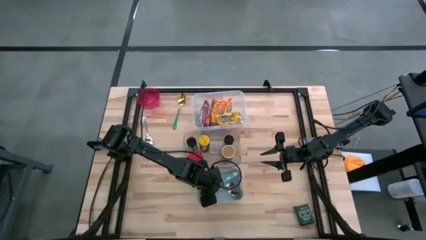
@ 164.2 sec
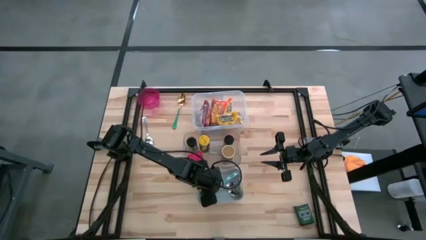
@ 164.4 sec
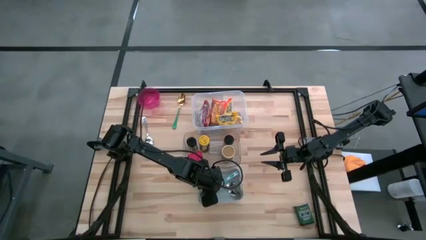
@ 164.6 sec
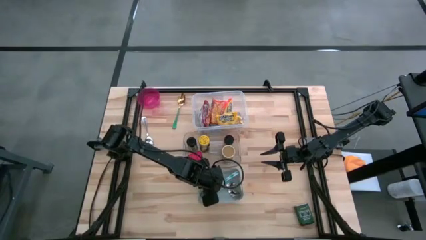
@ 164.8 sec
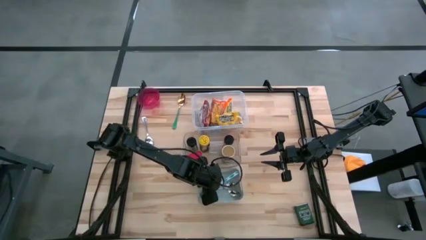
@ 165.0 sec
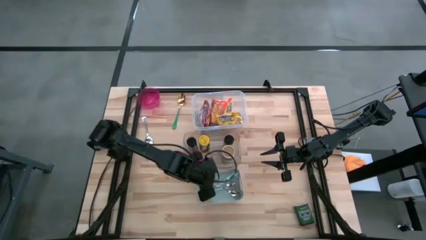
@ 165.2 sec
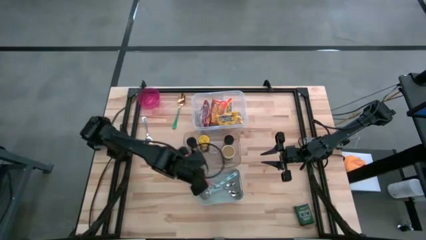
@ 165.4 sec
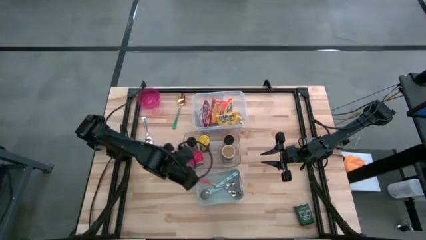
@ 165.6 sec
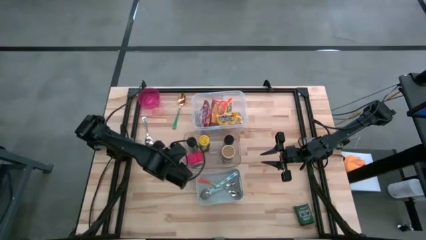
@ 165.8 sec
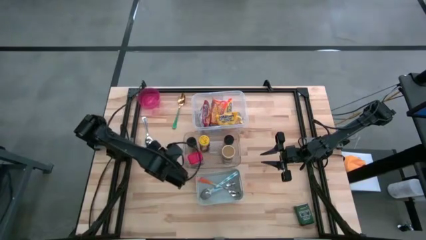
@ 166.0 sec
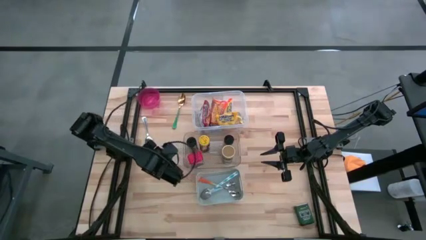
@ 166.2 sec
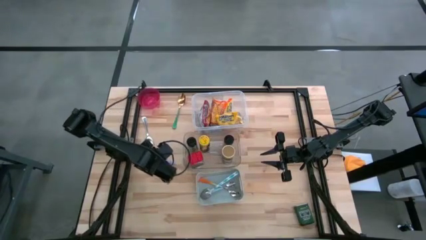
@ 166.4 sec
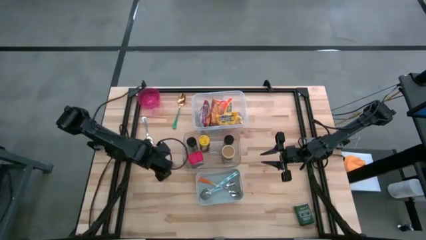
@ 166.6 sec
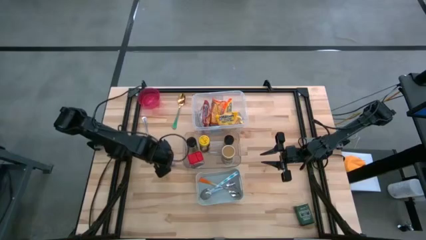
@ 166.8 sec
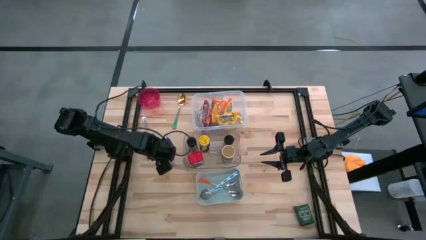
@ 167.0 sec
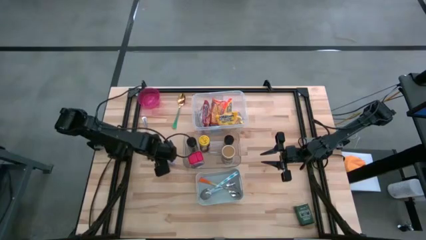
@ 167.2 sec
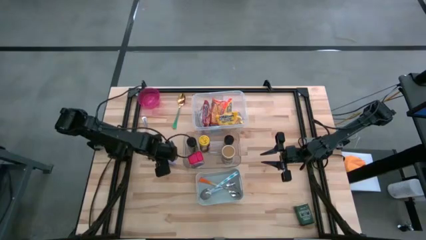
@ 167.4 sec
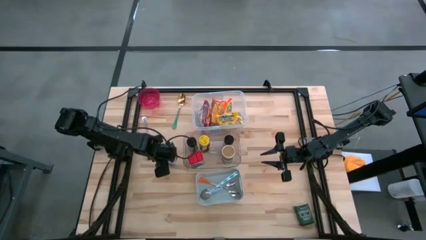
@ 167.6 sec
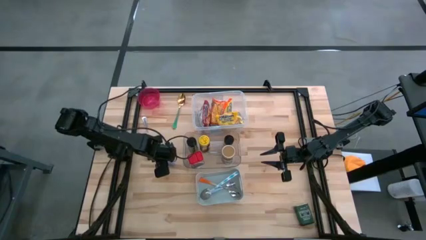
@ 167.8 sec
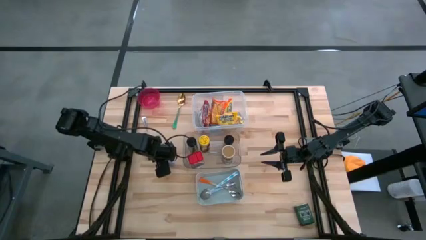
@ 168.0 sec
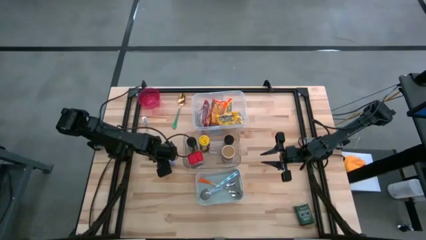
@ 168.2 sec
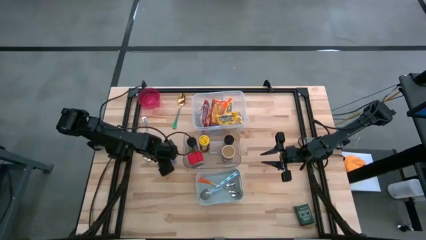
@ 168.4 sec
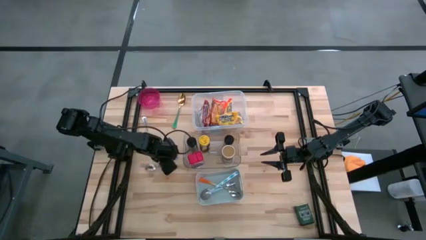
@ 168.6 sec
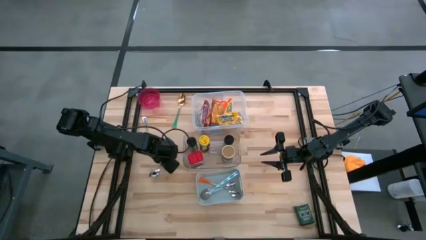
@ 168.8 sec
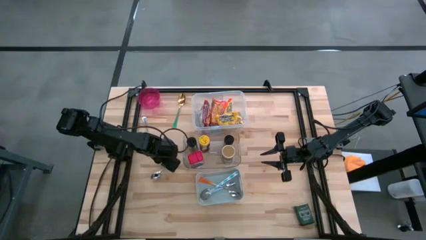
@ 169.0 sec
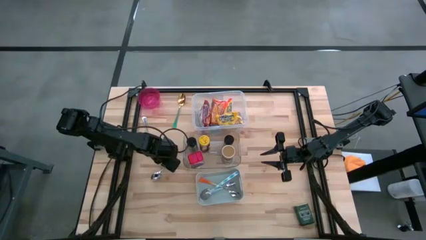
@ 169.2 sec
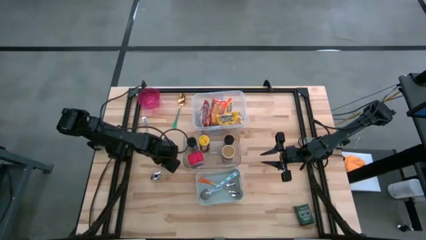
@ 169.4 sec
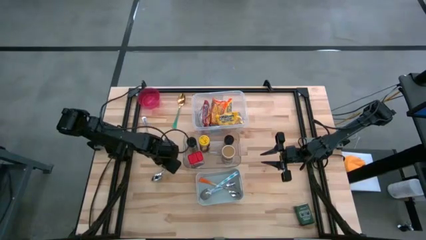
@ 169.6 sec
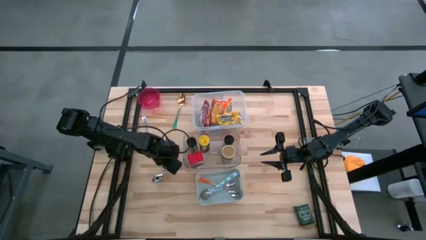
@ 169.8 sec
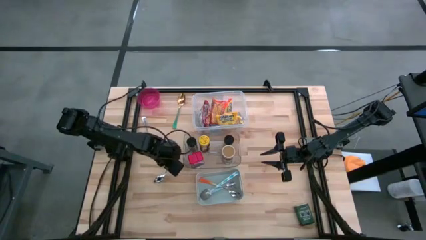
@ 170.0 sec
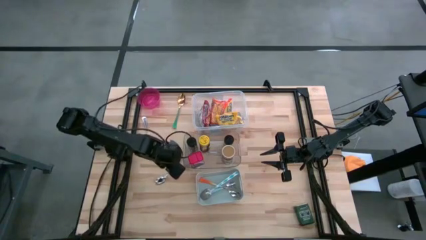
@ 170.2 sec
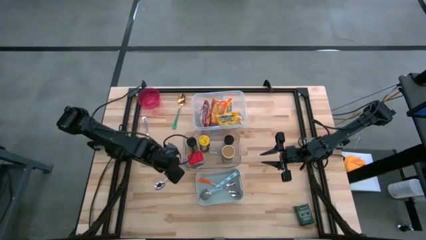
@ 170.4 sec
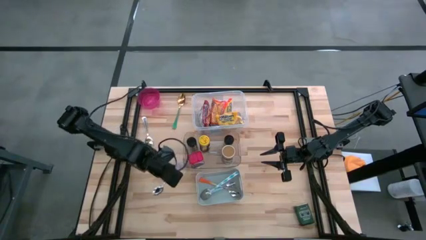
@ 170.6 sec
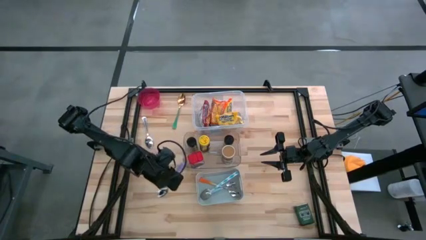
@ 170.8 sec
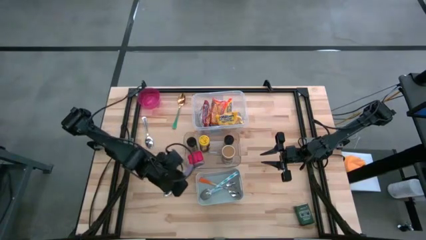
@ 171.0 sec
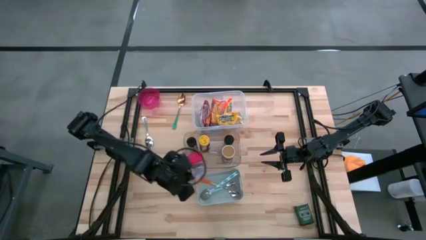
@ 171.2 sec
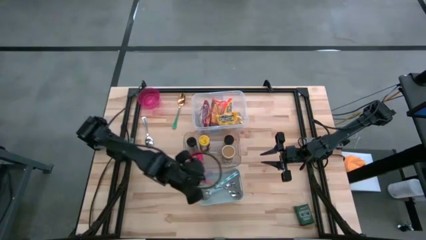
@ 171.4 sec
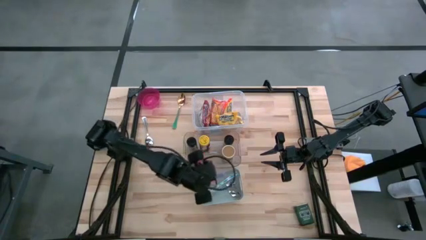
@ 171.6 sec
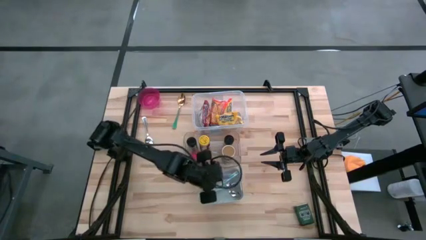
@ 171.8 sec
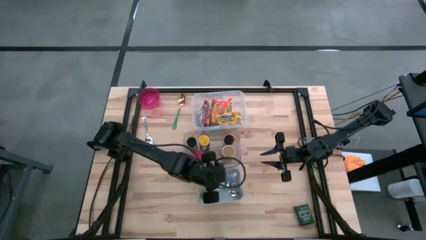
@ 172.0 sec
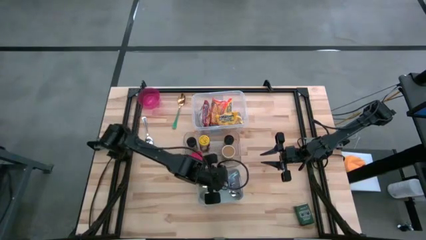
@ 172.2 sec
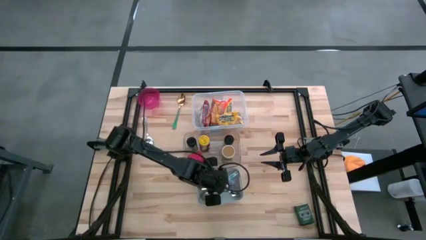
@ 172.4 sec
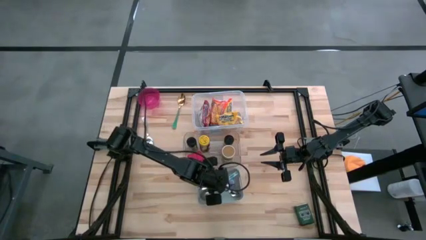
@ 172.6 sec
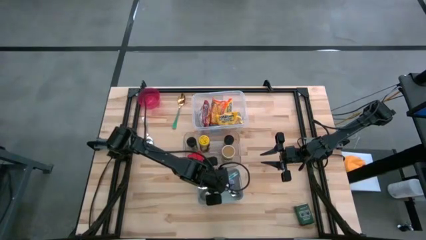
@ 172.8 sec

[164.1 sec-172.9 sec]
Put the purple spoon into the gray bin

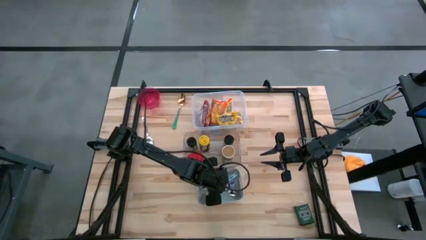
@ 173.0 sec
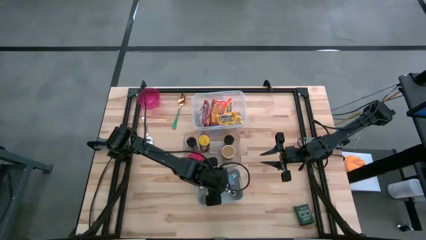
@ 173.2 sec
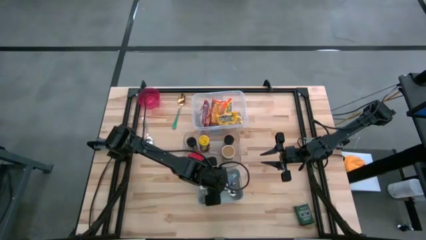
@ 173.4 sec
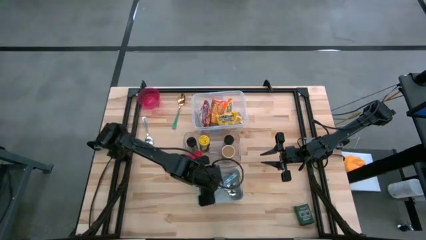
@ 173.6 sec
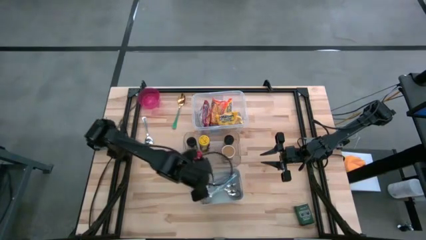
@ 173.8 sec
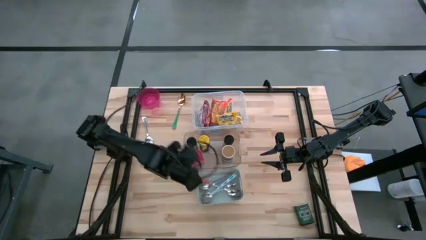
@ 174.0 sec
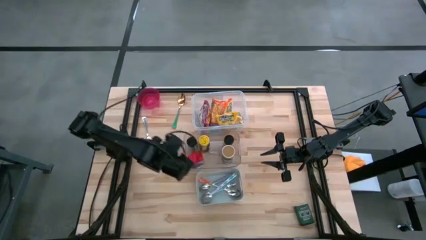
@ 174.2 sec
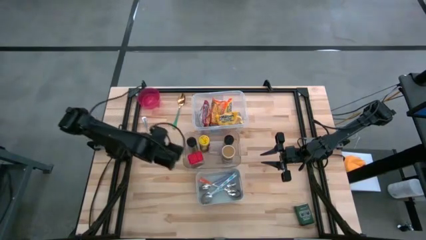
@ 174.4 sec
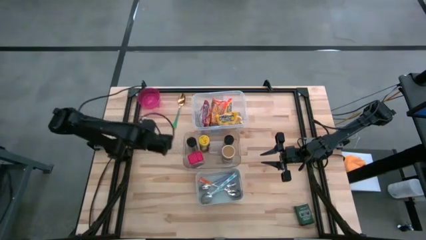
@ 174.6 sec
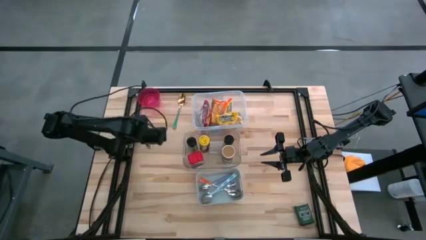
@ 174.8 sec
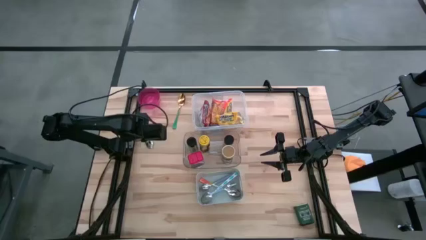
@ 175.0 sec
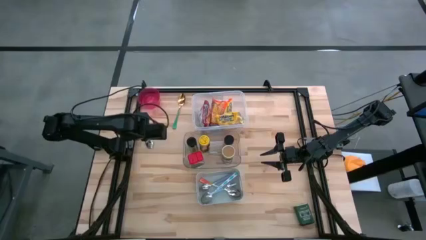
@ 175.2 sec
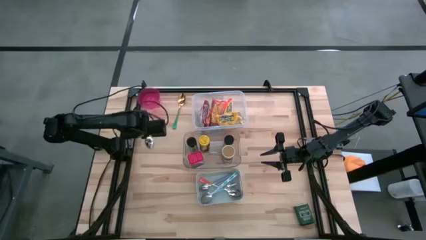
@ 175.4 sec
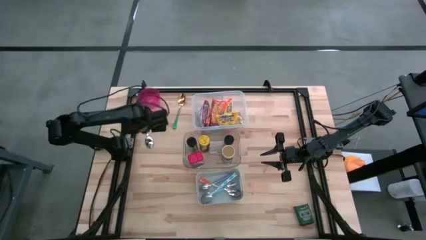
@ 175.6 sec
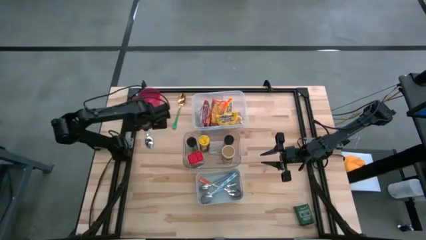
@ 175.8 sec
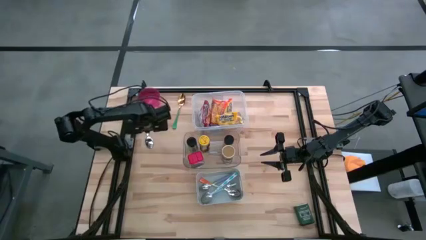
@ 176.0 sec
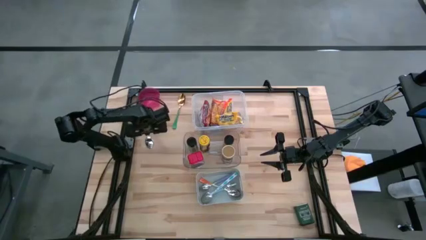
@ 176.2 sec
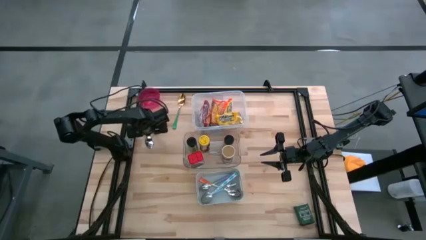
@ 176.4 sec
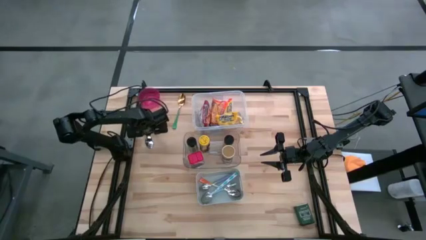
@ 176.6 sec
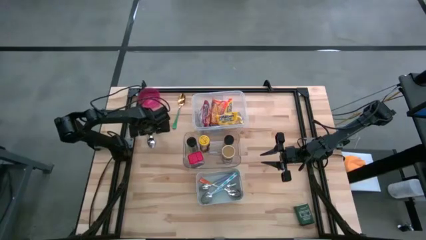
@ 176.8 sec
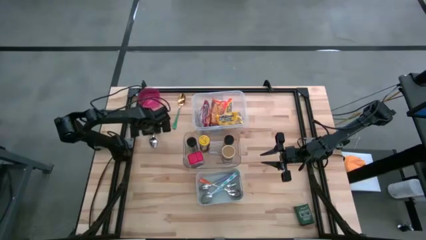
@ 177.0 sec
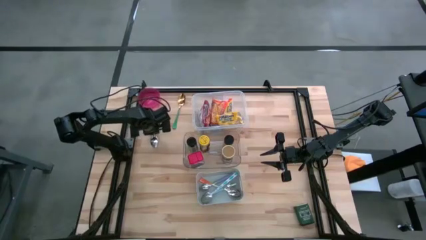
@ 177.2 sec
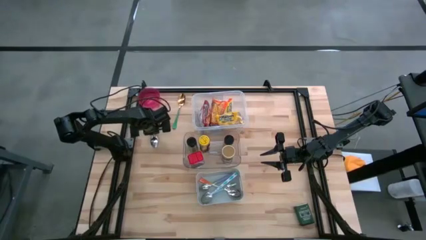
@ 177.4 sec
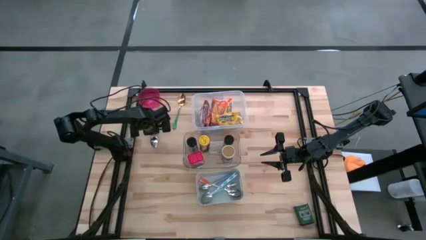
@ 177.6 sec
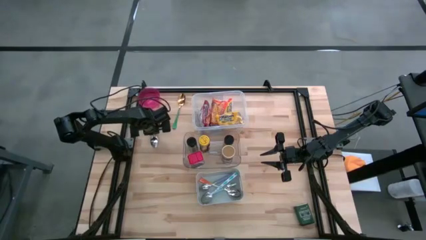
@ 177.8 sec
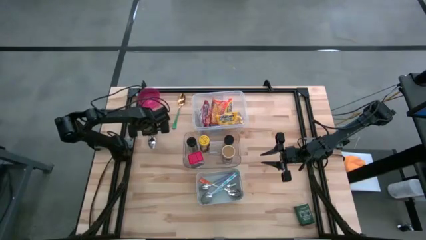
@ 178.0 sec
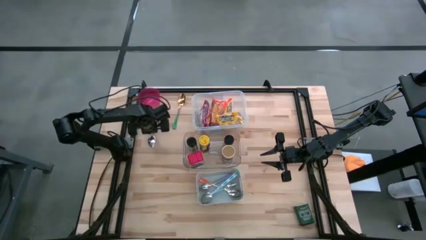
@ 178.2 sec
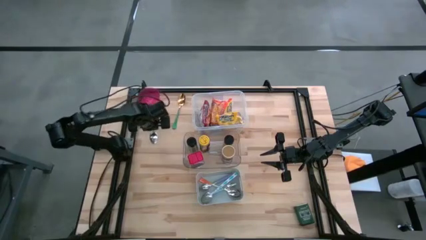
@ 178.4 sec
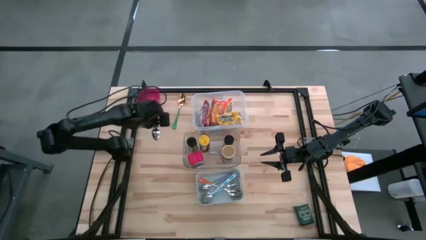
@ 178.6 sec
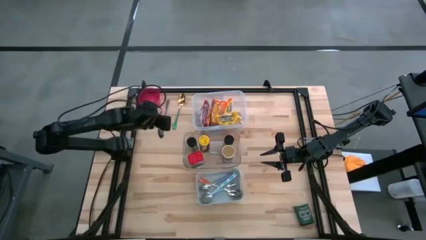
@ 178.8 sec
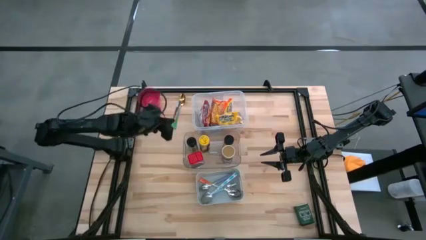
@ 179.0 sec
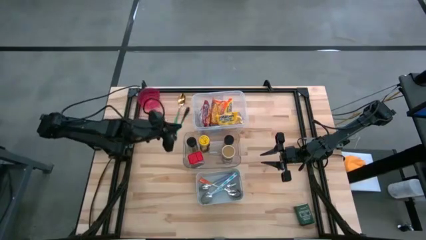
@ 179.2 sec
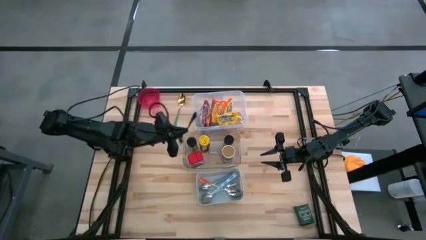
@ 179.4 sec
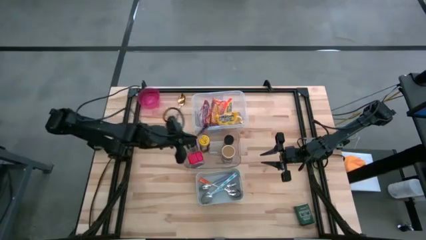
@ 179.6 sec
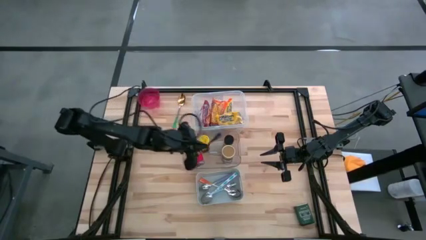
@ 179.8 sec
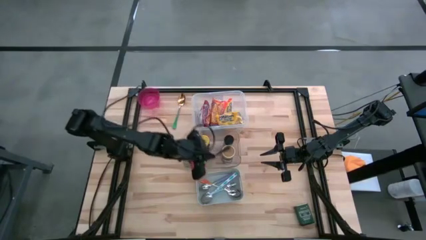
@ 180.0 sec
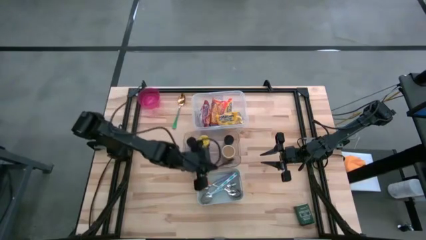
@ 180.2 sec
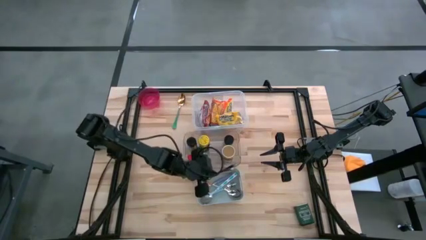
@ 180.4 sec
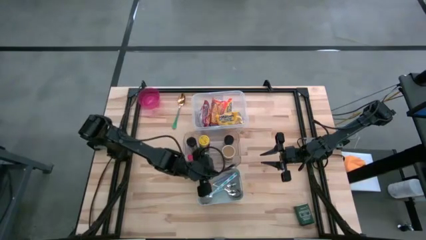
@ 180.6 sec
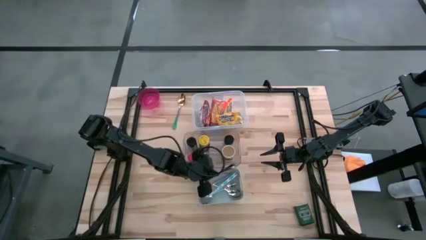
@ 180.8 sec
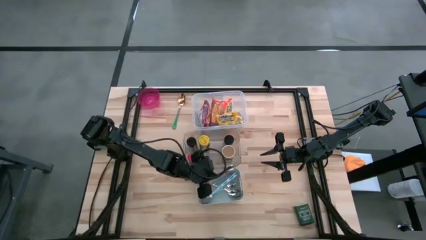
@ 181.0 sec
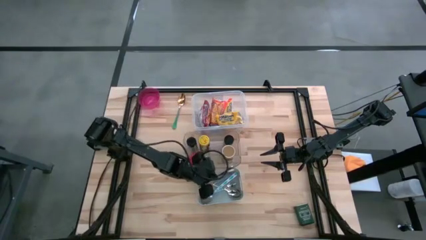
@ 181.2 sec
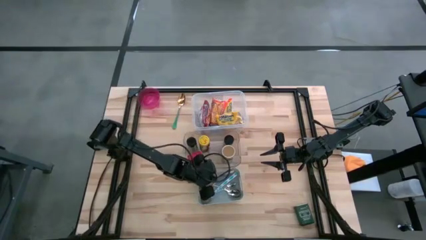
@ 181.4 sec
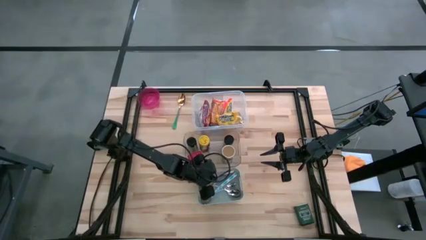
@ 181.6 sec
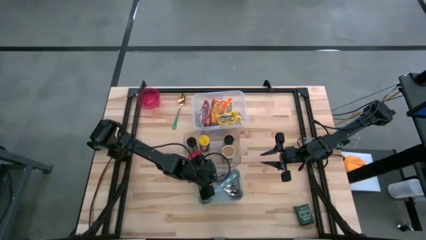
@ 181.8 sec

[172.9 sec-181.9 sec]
Put the silver spoon into the gray bin
